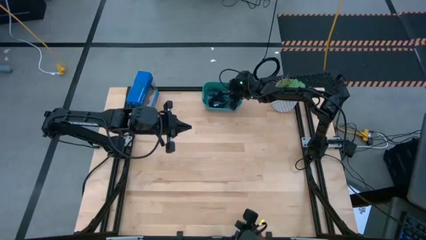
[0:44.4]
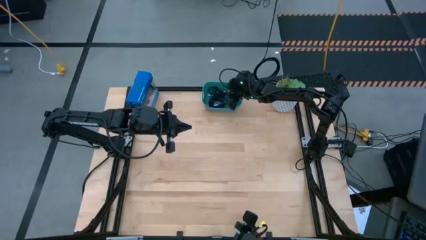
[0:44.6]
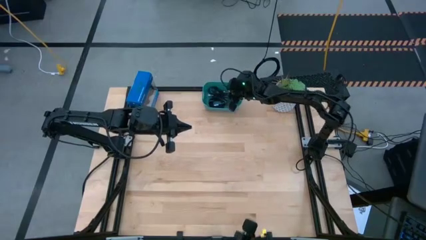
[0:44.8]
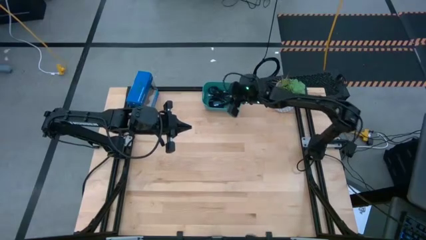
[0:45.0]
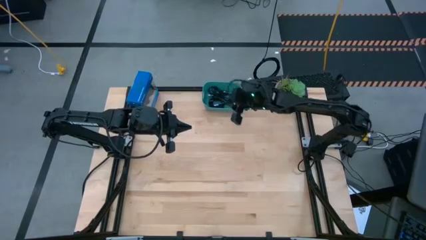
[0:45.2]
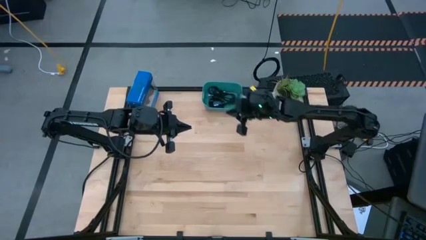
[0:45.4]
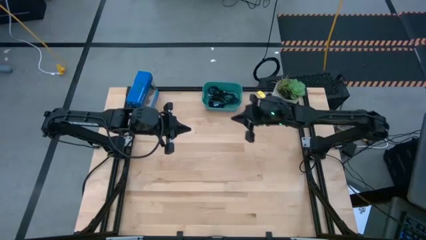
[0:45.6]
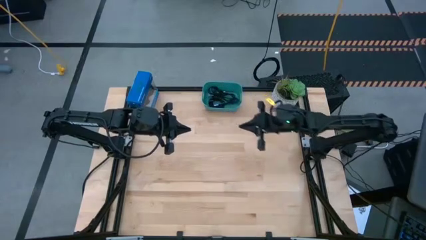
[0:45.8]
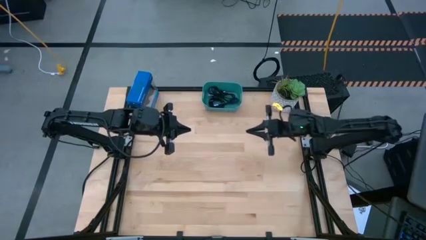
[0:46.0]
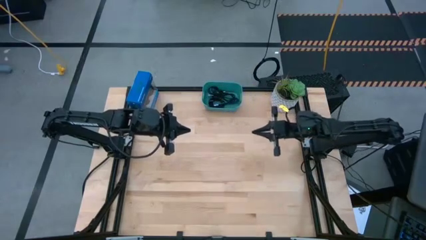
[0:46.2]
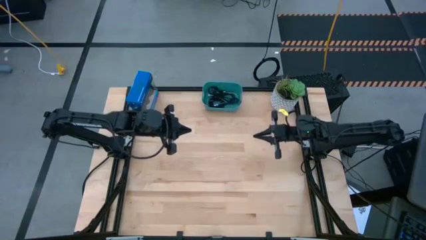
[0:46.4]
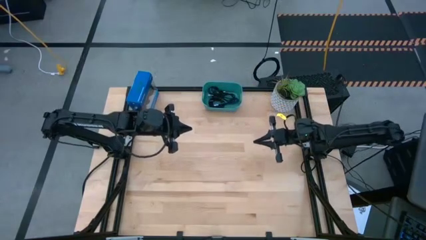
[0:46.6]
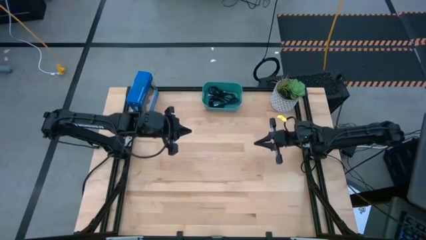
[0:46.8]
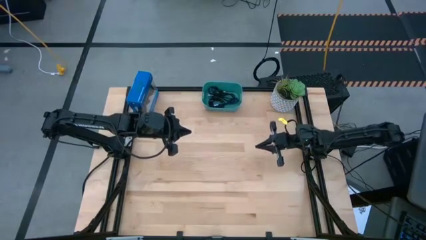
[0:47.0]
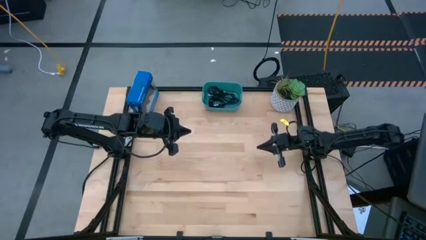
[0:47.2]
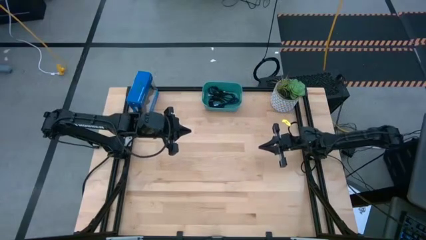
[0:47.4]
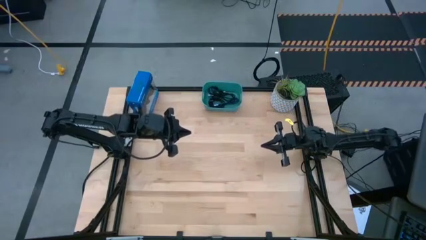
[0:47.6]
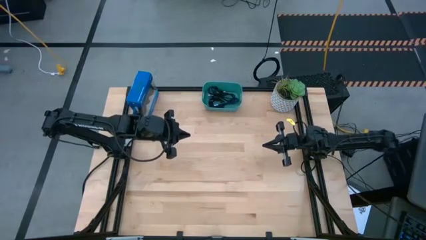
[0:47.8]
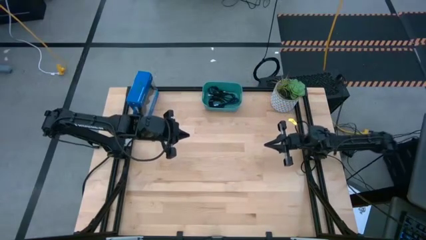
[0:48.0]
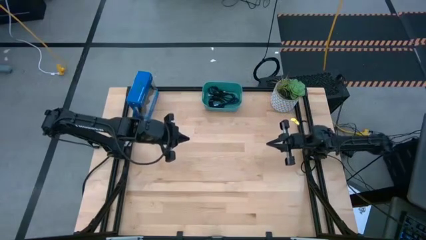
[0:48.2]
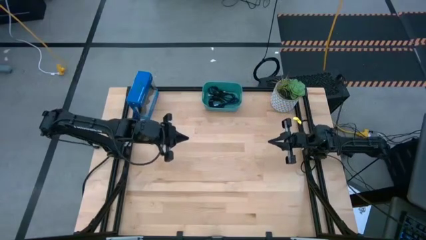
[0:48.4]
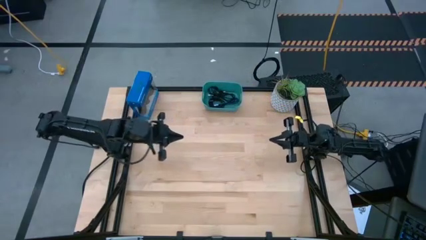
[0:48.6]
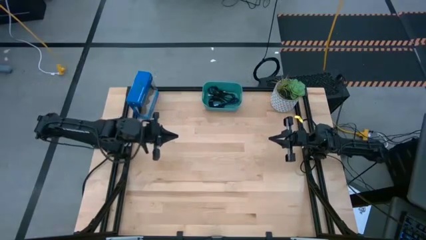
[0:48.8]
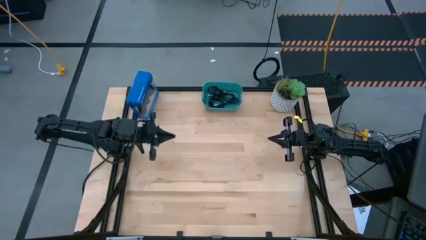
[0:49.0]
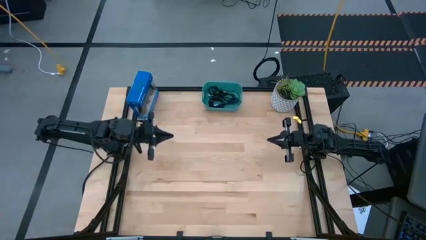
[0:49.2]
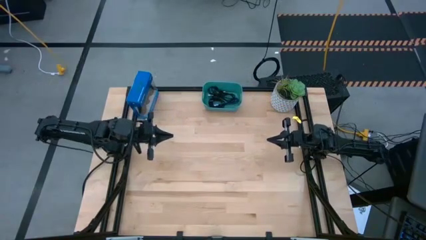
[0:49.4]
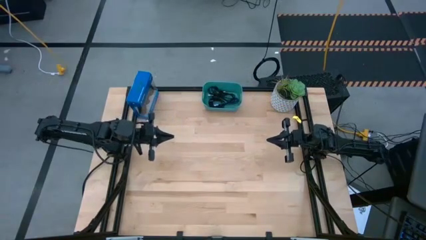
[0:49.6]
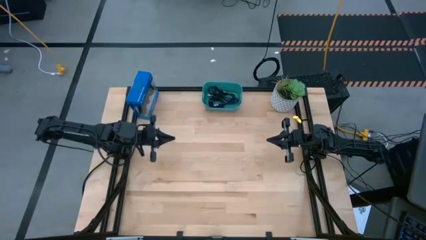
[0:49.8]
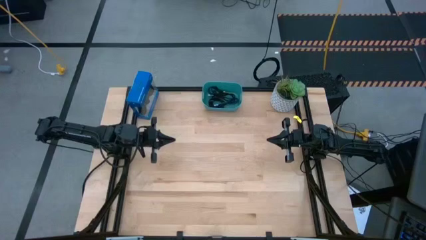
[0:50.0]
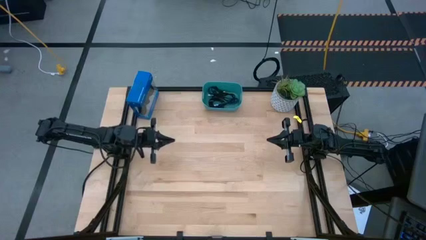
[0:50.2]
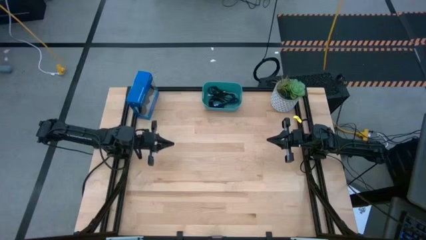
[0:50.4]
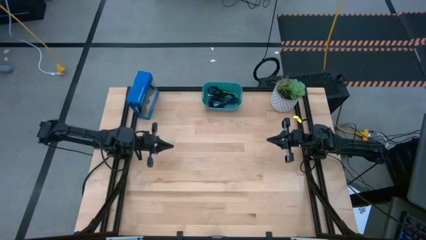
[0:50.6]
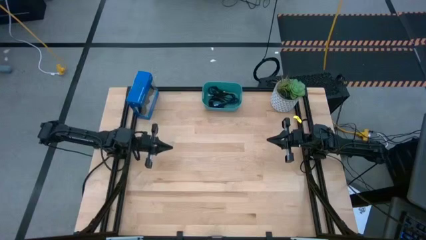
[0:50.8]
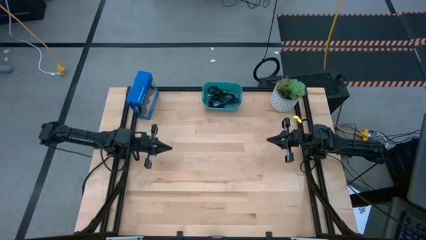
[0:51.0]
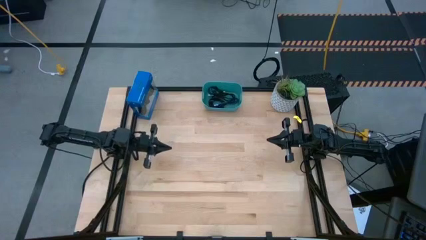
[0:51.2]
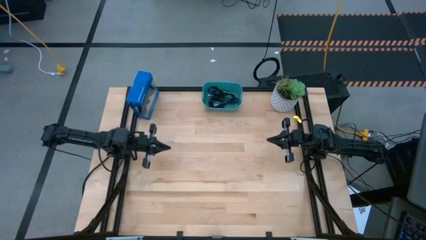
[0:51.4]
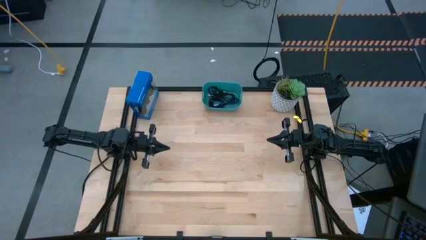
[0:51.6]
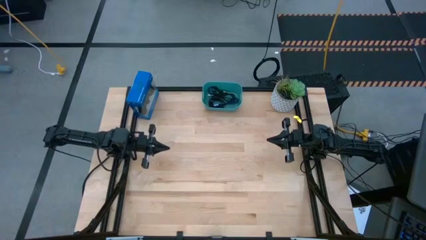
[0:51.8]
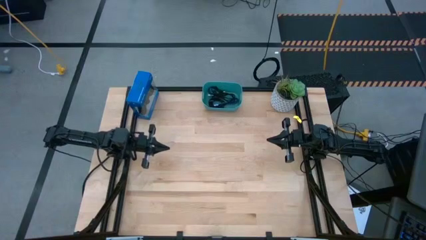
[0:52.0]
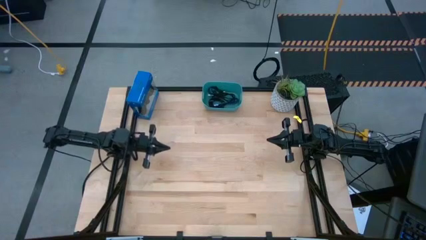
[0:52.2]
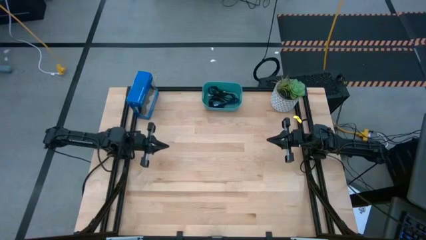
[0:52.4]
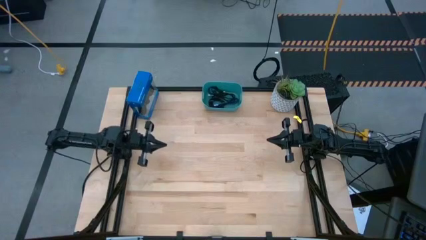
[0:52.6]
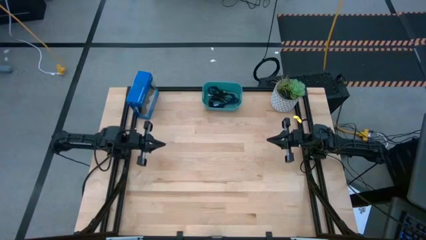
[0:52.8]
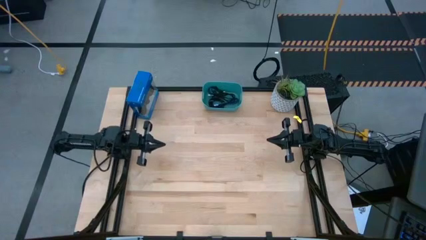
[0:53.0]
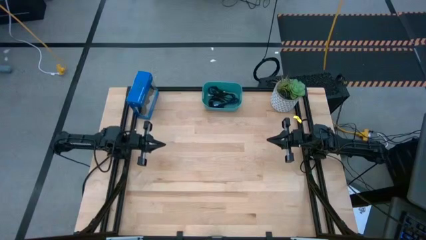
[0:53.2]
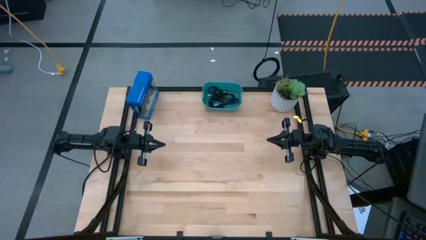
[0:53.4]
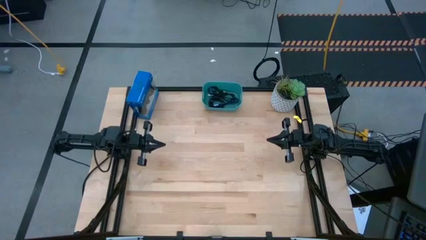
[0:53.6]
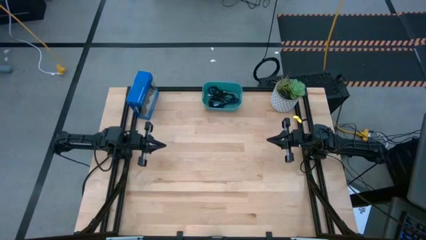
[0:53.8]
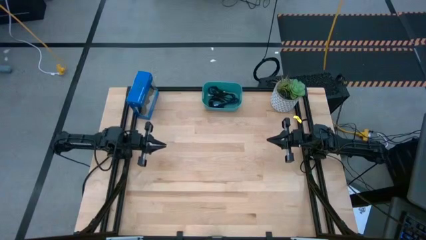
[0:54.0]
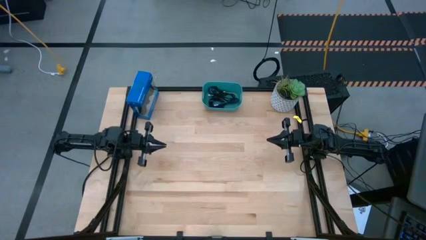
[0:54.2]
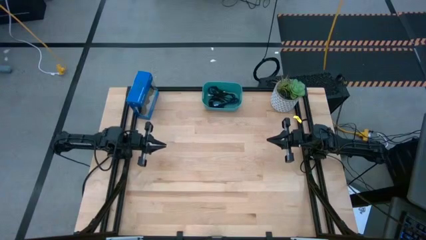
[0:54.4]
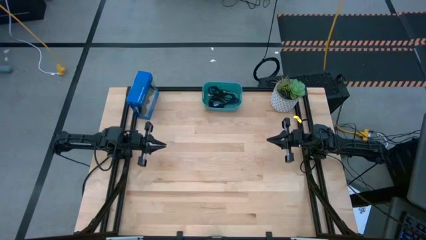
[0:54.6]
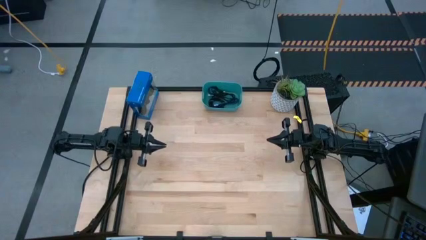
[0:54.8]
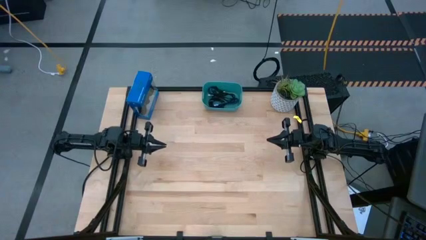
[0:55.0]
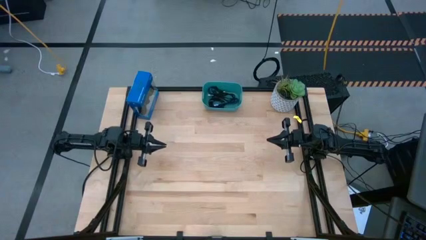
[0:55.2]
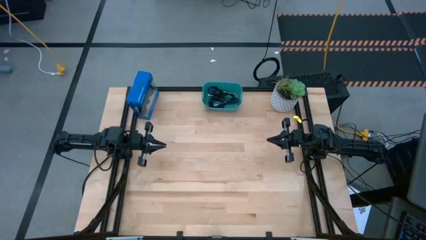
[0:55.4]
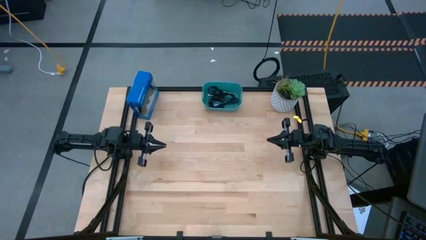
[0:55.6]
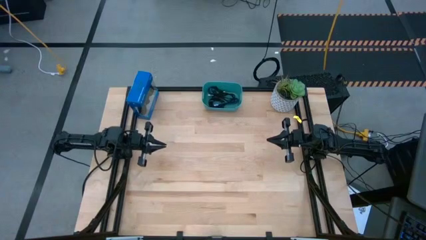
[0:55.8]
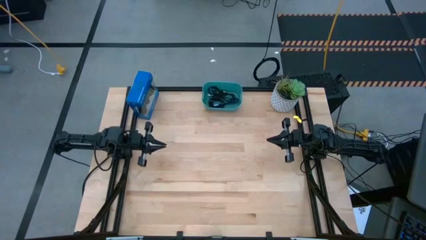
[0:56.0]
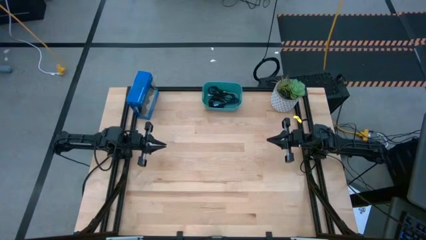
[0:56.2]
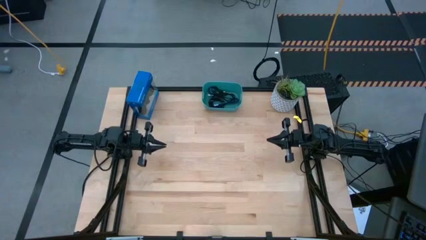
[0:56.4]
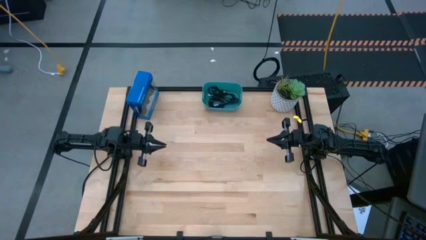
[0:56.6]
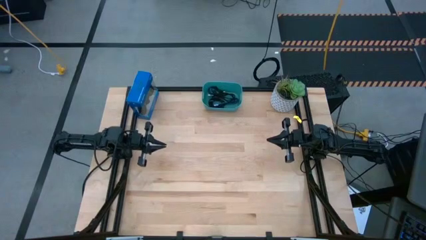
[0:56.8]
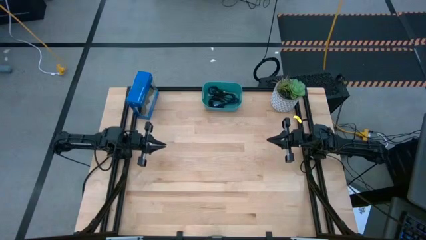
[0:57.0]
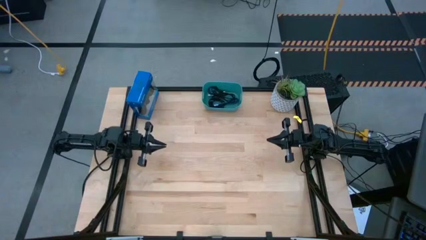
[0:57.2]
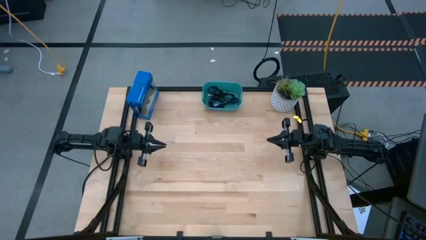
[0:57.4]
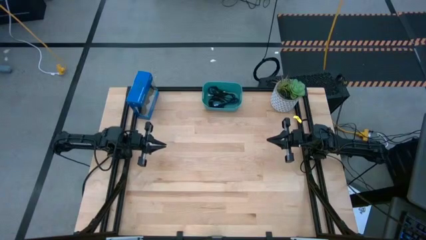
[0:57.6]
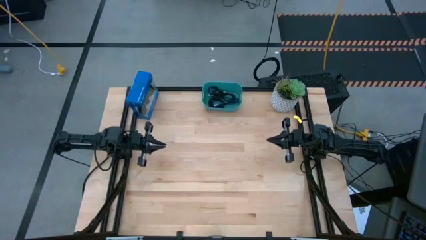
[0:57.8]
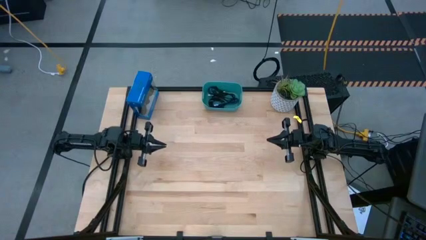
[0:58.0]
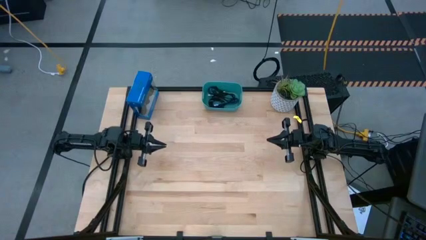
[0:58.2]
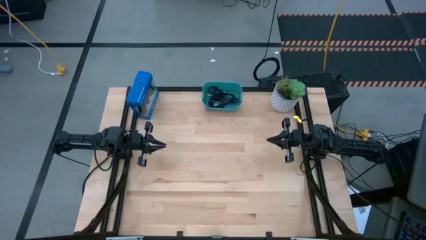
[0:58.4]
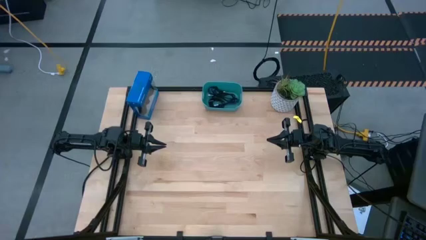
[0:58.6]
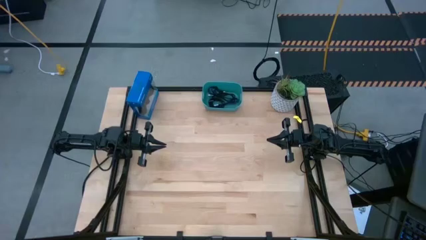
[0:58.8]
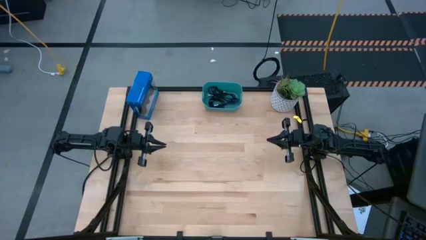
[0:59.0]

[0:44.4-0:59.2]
Task: Pick and place USB-C Cables
Return to Home Position
